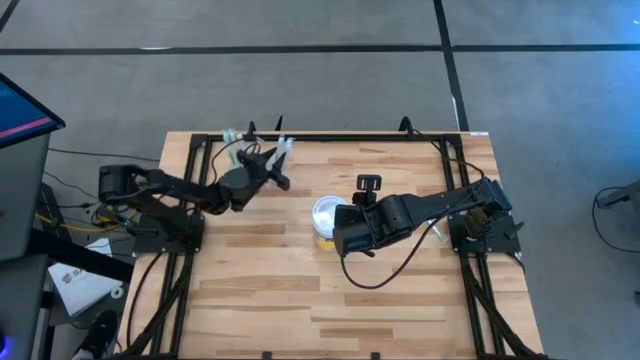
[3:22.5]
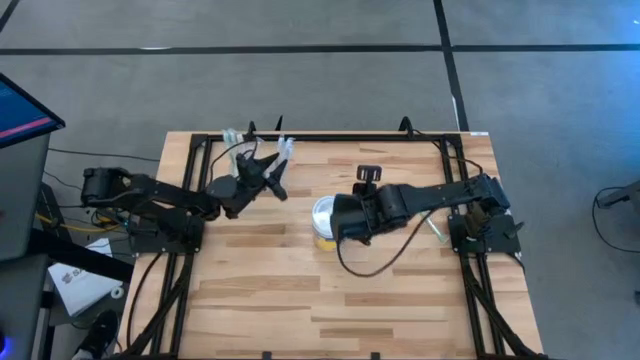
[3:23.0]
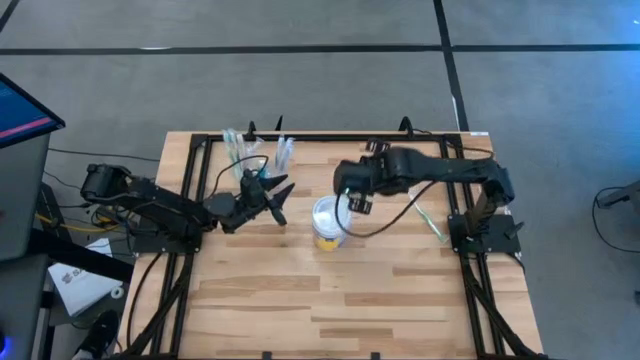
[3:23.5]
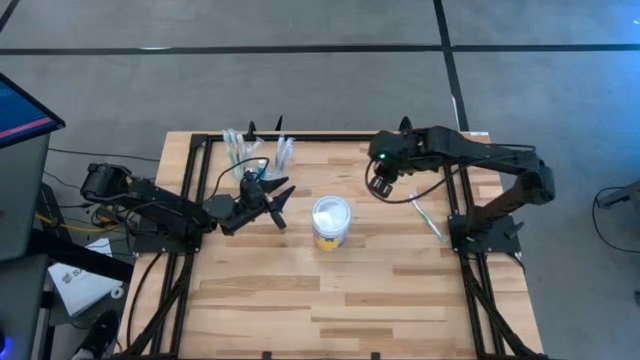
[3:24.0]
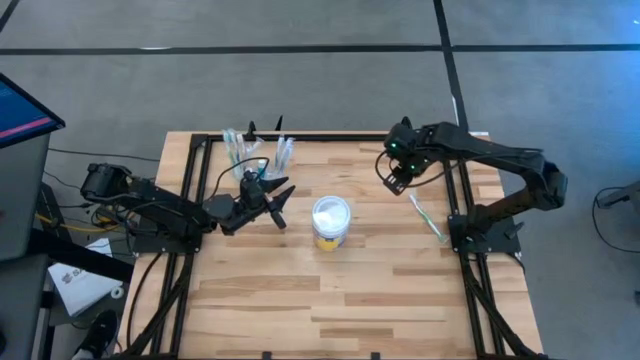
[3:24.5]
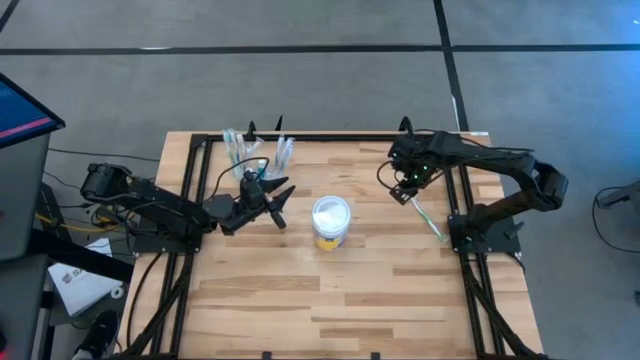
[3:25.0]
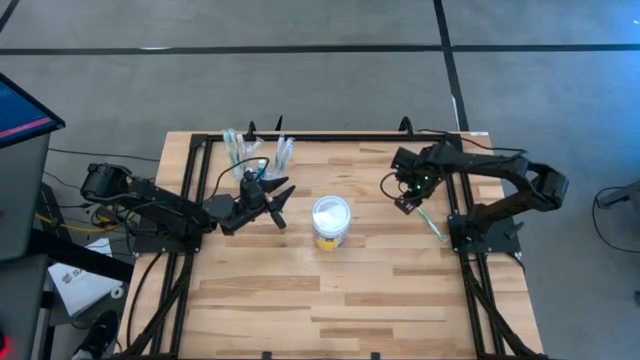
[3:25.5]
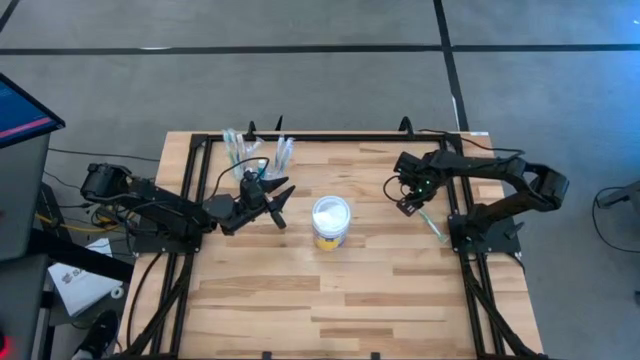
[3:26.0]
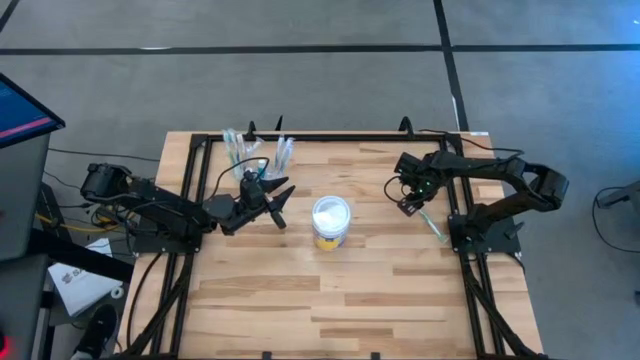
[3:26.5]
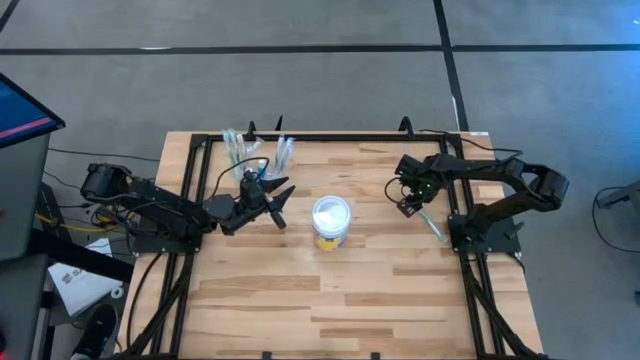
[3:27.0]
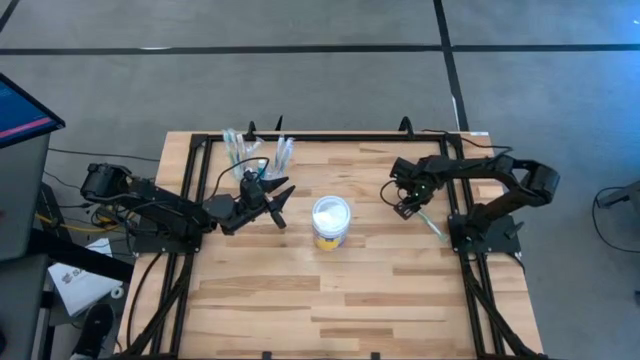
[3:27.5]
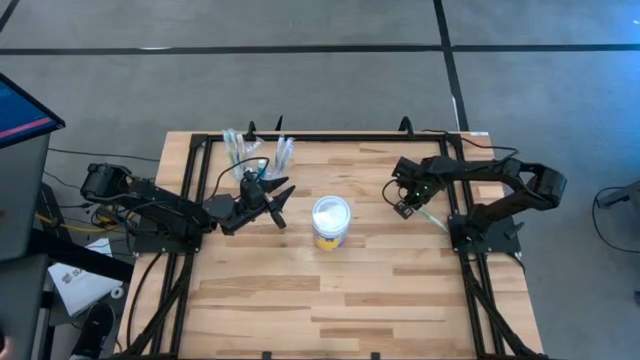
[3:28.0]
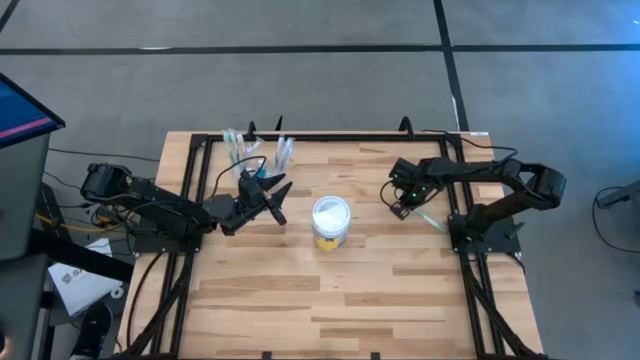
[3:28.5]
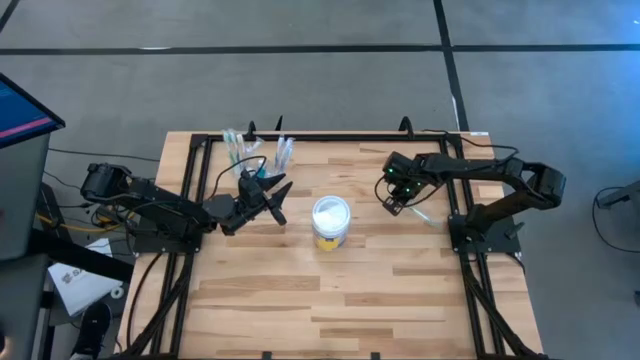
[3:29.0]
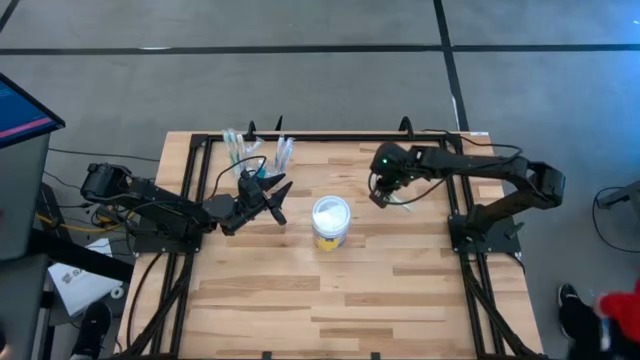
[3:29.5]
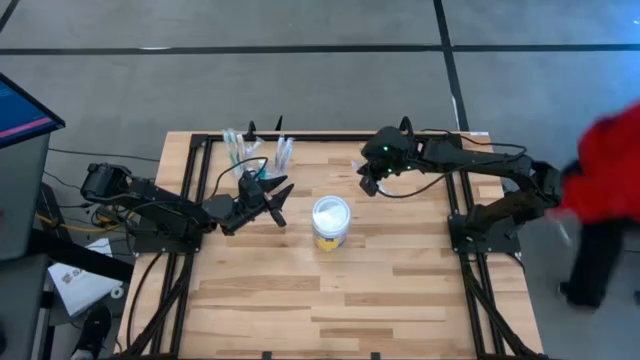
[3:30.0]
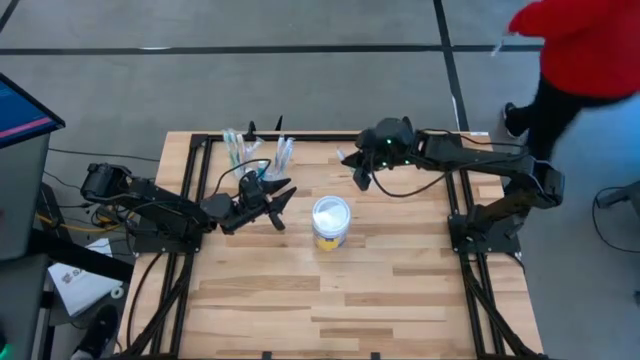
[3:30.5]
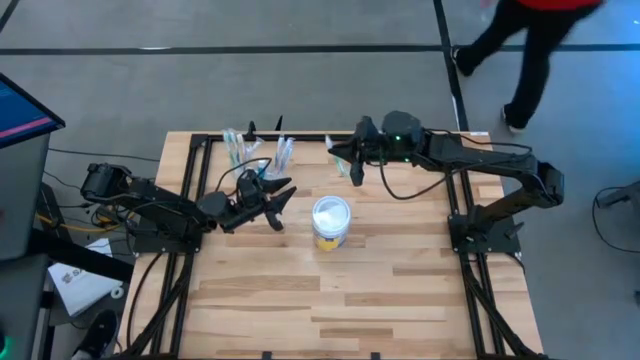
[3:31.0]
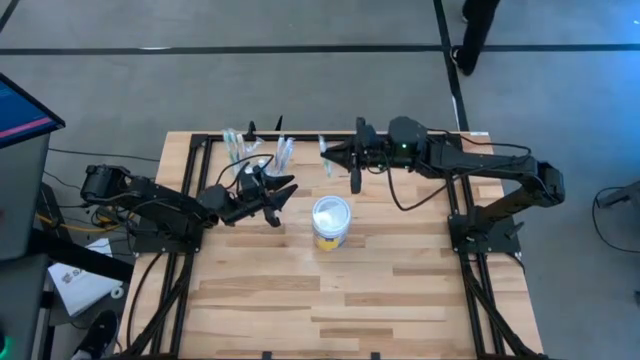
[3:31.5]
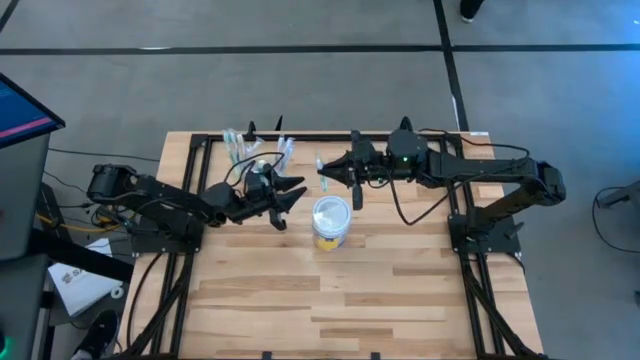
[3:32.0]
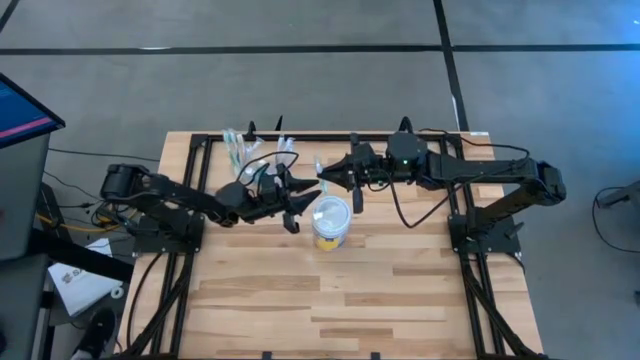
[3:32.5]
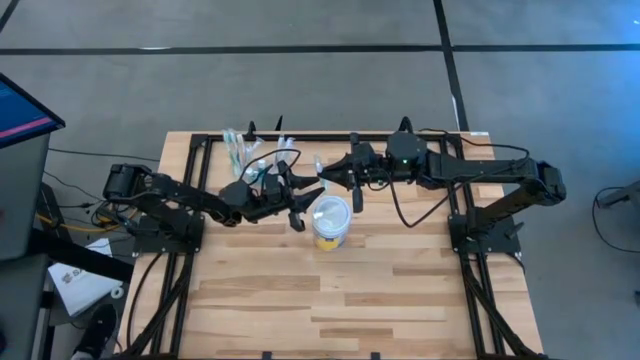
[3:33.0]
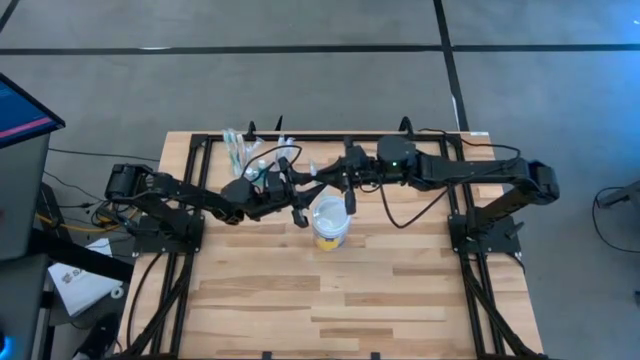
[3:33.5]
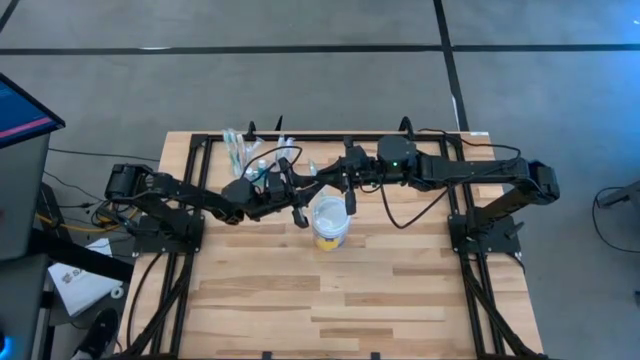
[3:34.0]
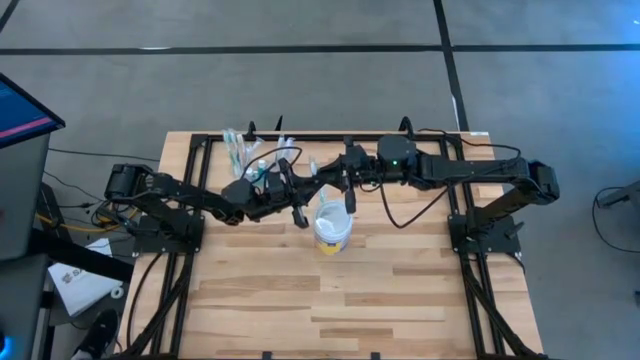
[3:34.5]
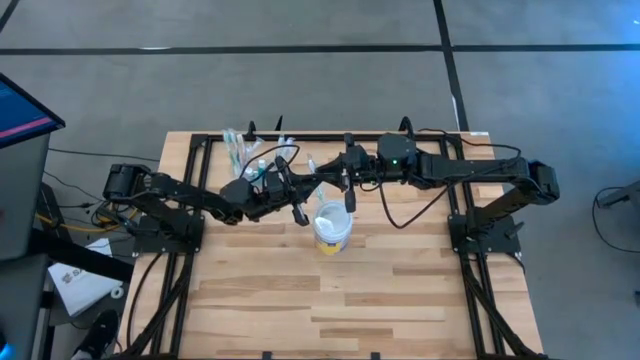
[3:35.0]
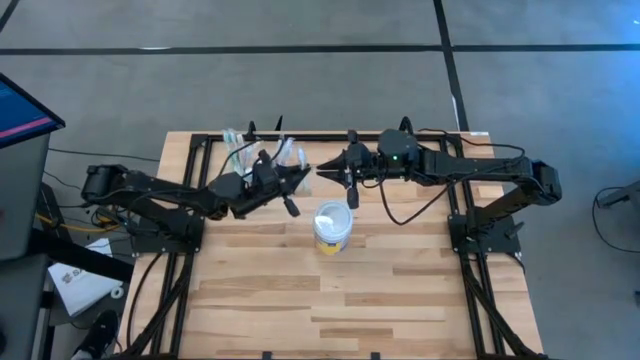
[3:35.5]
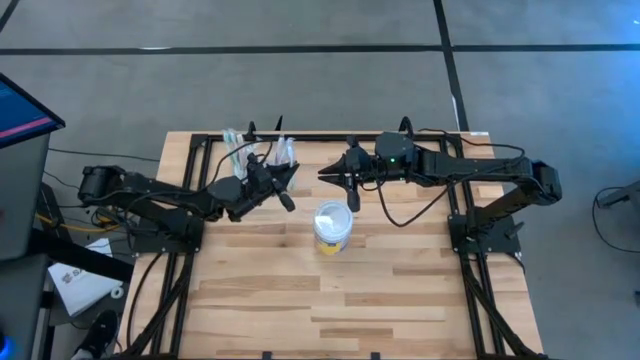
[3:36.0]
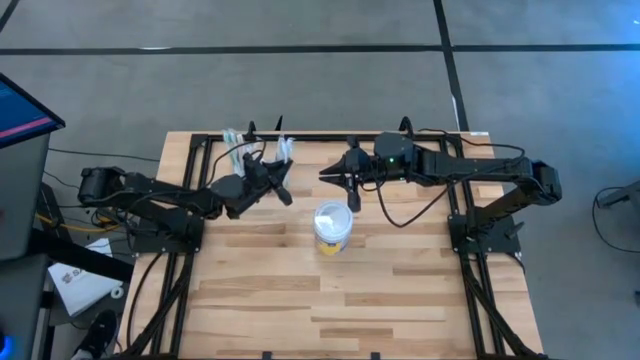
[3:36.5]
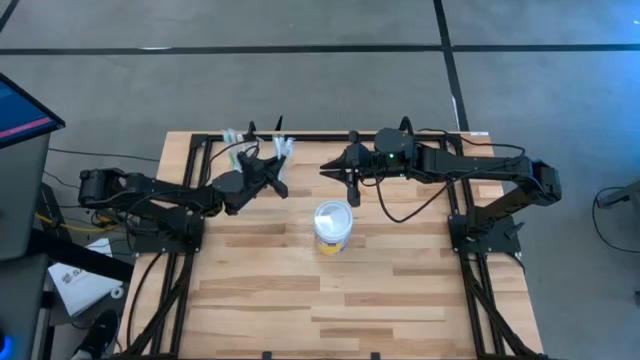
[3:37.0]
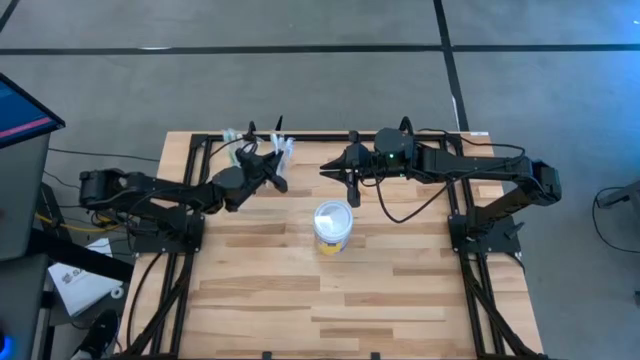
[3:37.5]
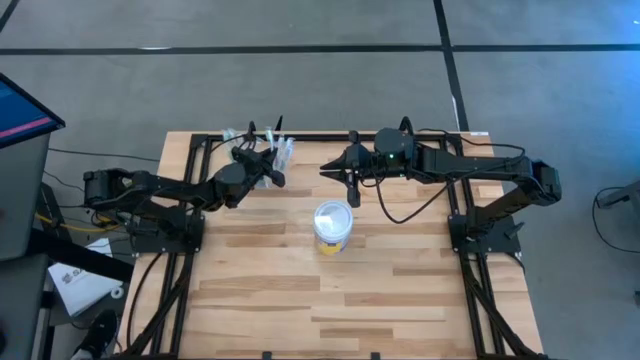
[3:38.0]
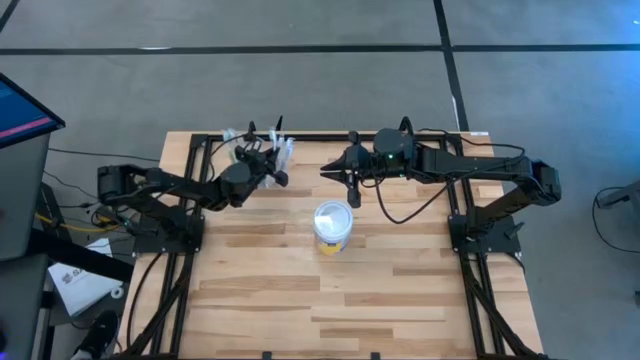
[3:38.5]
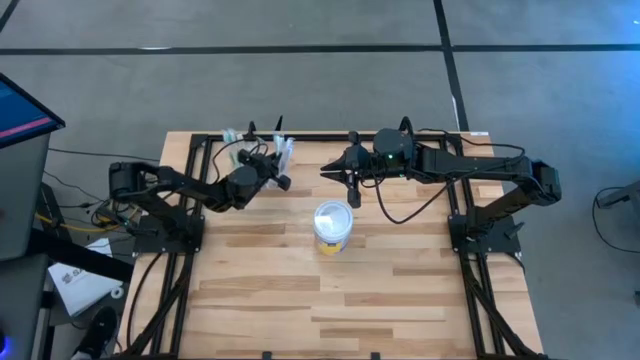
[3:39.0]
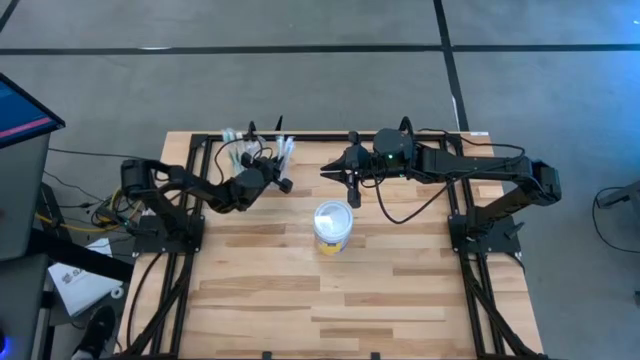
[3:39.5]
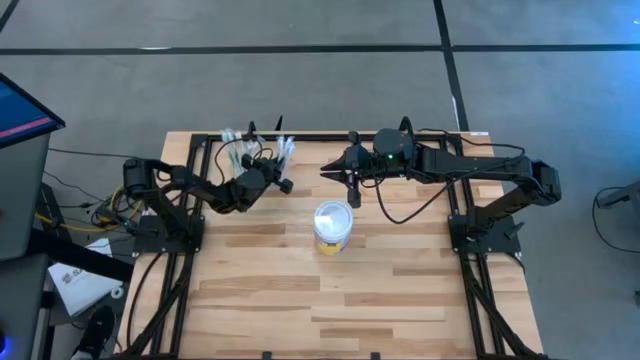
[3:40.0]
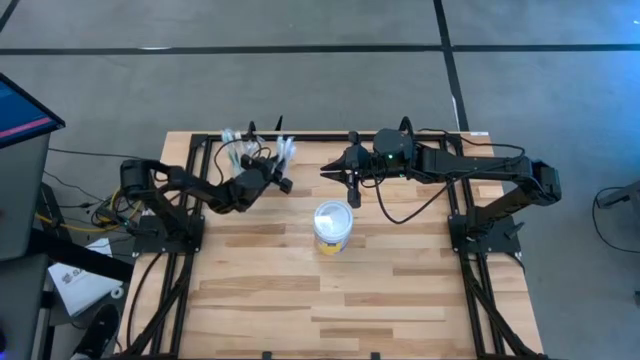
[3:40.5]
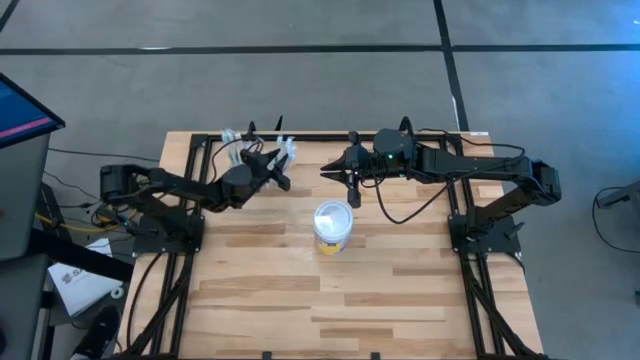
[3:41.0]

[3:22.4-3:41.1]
Task: Pick & Place toothbrushing station
Put the green toothbrush into the white organizer

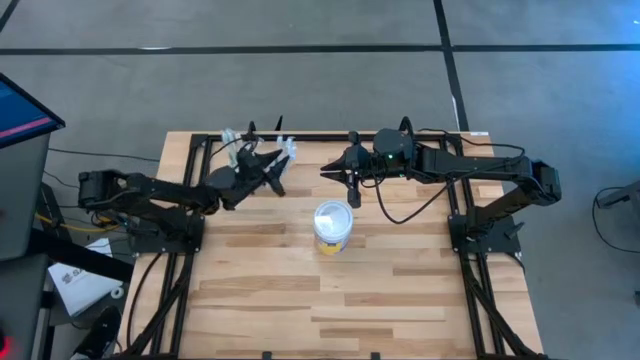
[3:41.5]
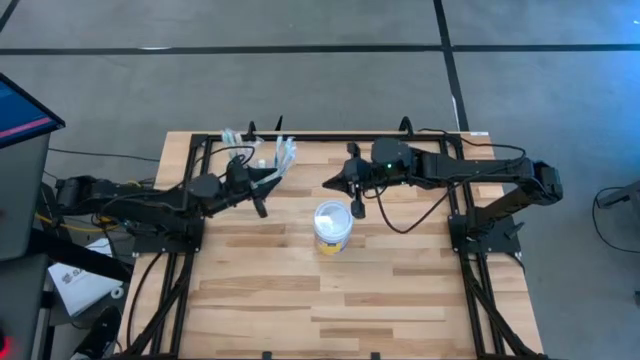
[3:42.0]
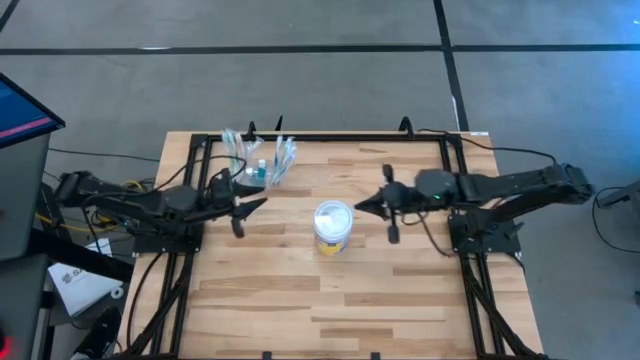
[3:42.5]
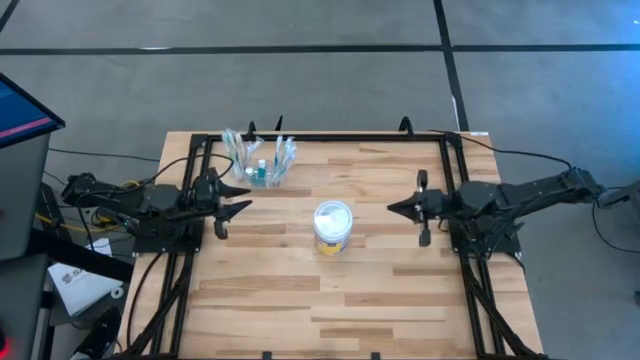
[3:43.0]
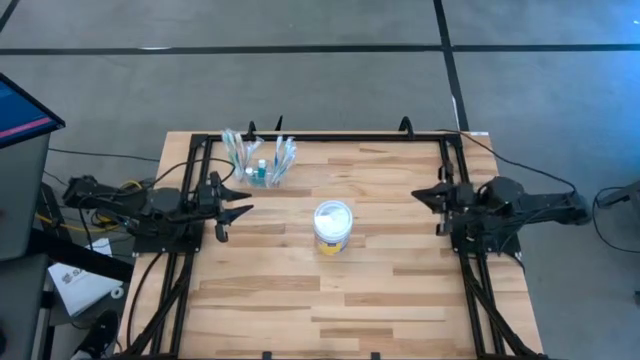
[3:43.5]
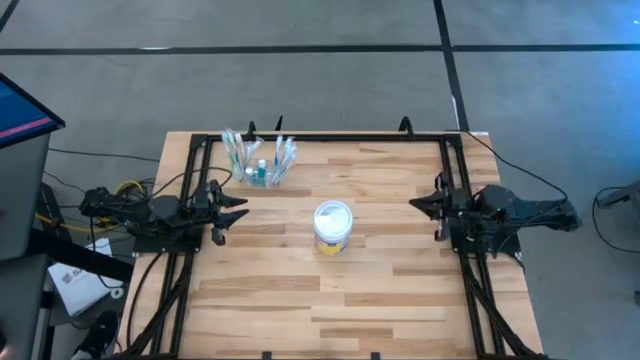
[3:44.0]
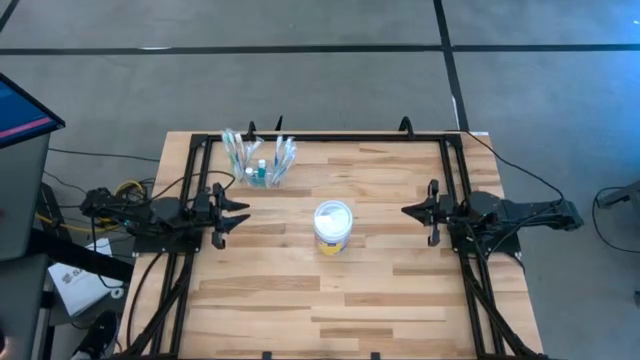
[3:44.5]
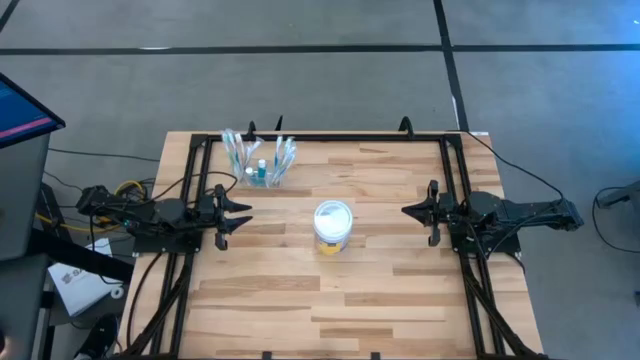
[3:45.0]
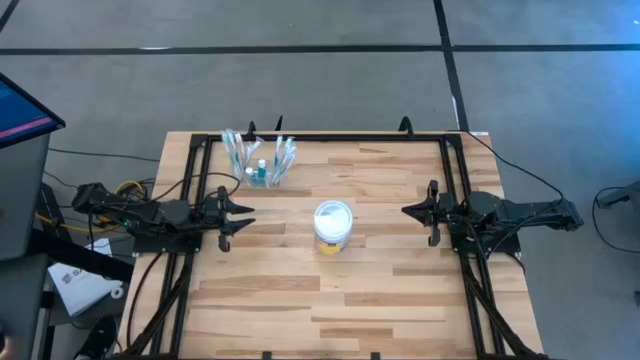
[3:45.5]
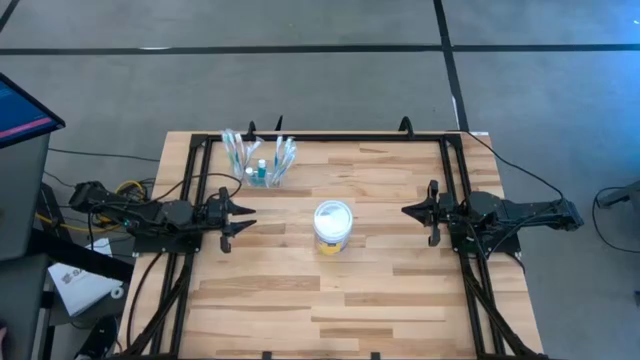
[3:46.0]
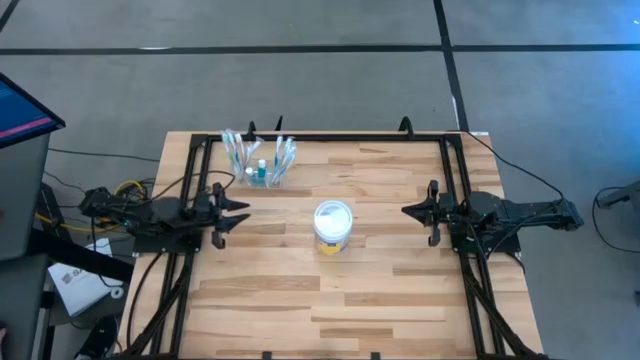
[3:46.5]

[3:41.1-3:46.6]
Return to Home position
